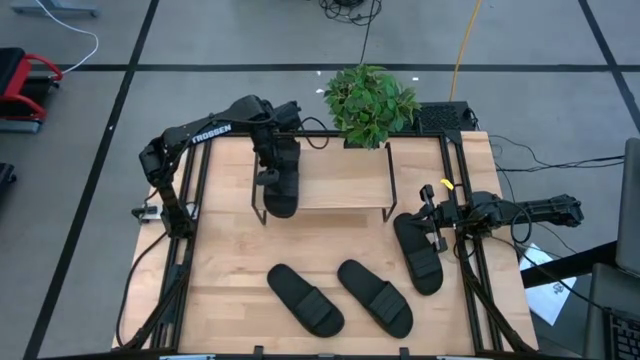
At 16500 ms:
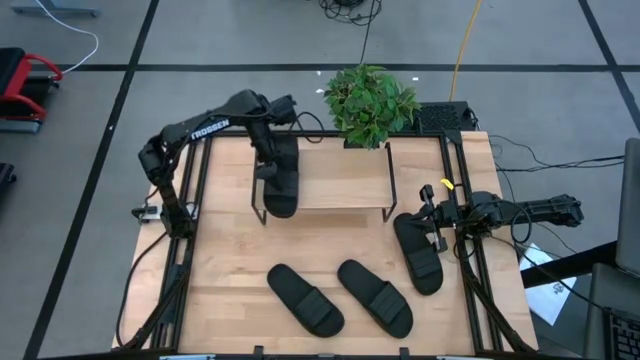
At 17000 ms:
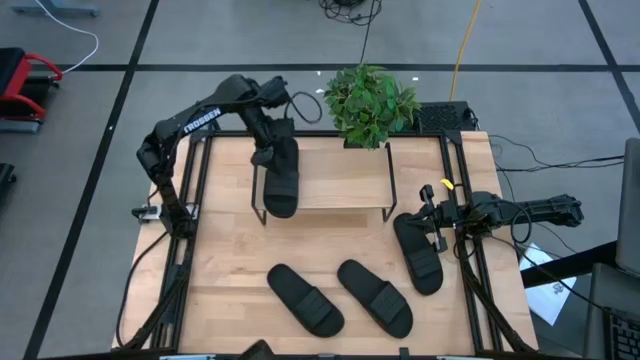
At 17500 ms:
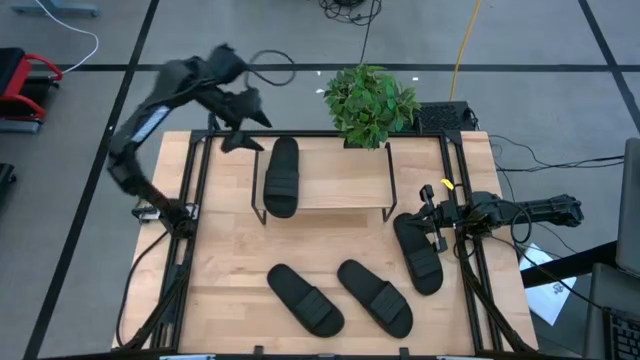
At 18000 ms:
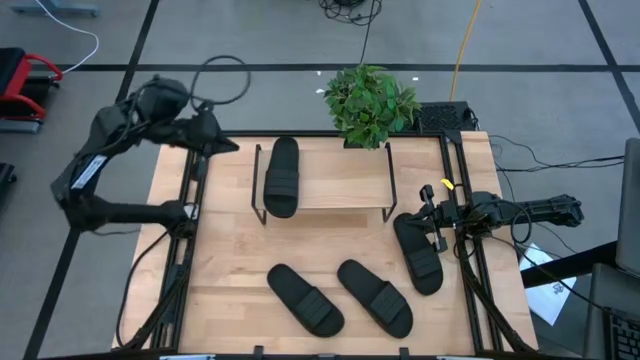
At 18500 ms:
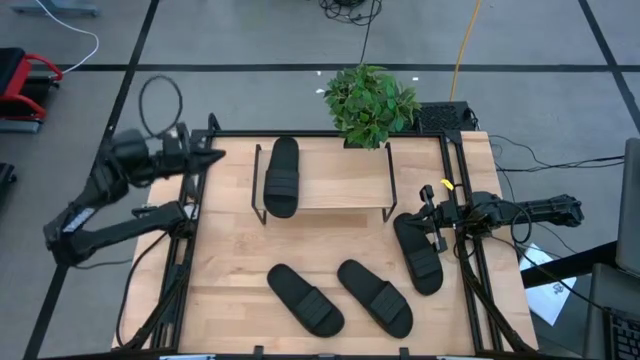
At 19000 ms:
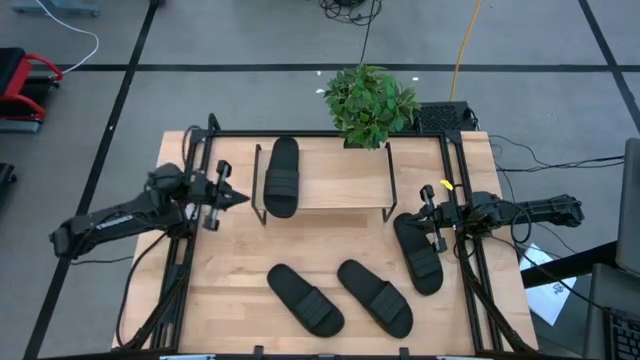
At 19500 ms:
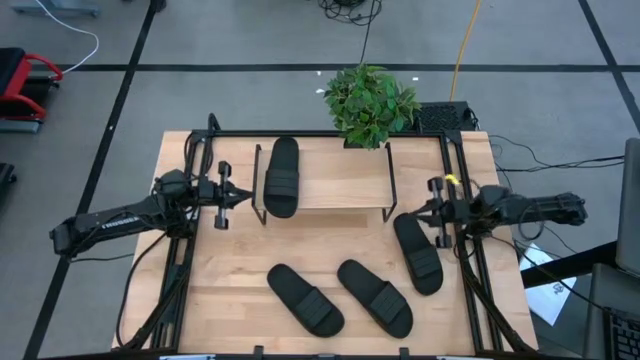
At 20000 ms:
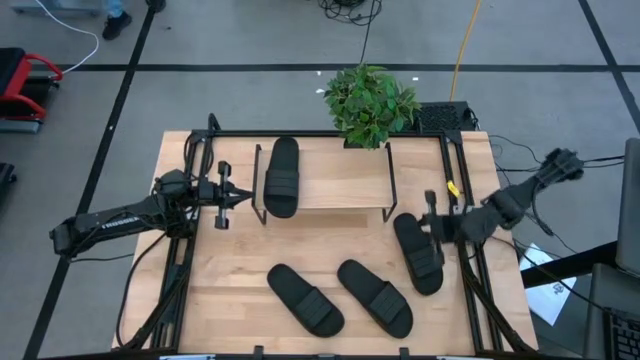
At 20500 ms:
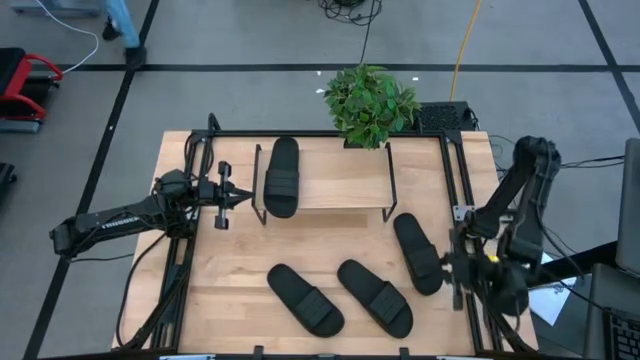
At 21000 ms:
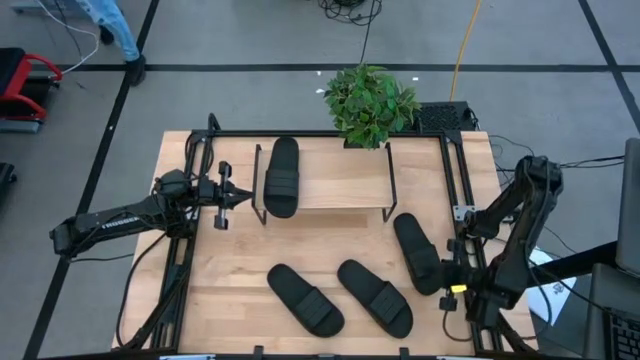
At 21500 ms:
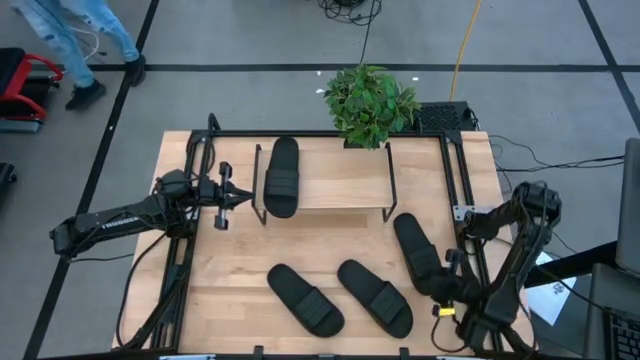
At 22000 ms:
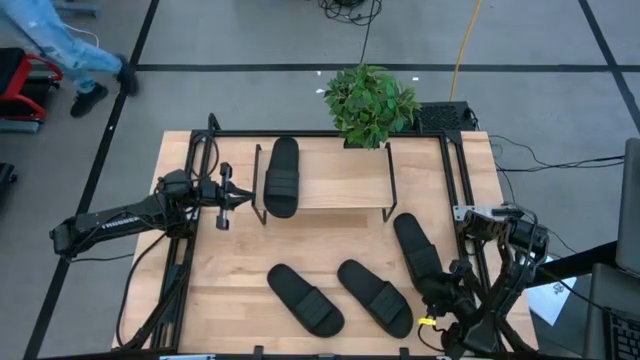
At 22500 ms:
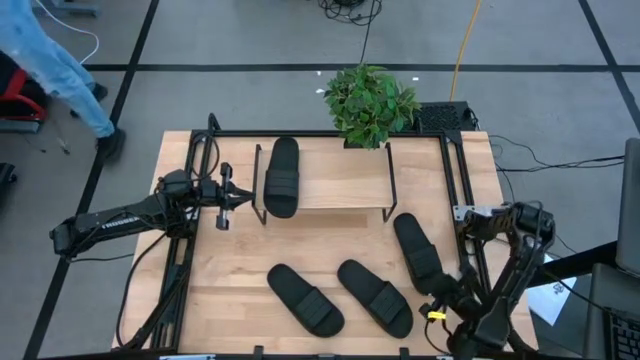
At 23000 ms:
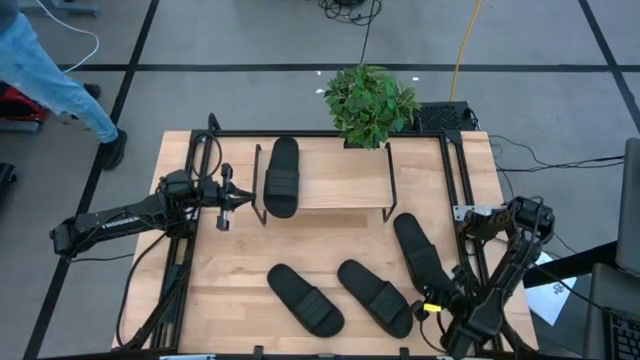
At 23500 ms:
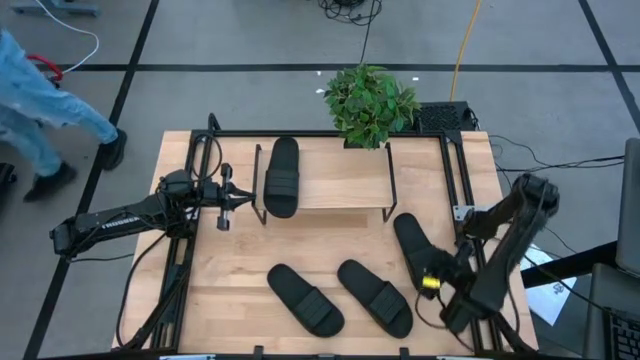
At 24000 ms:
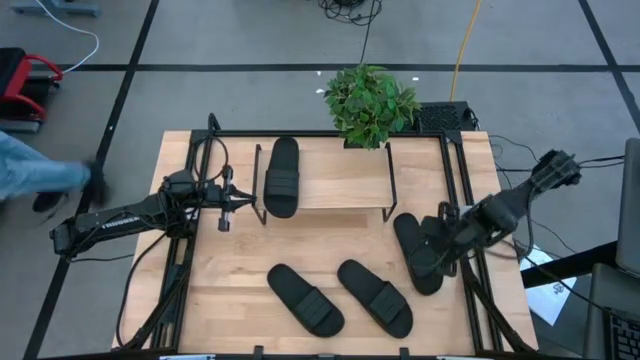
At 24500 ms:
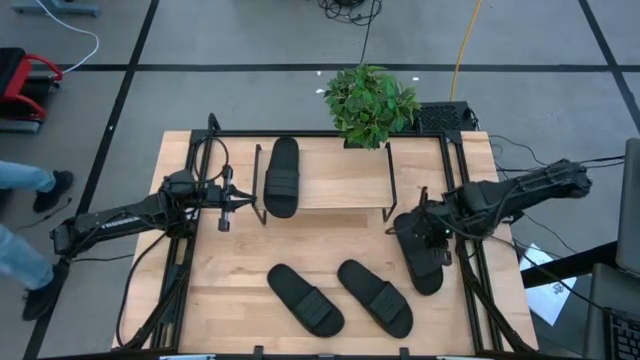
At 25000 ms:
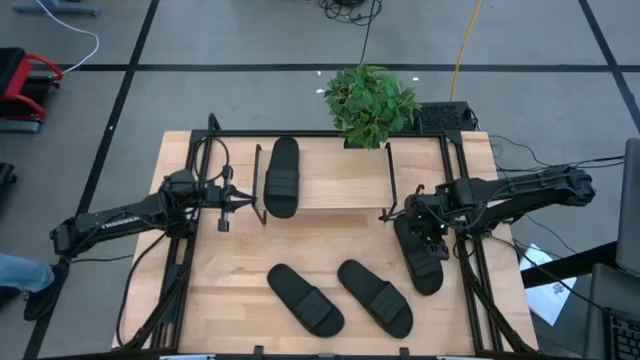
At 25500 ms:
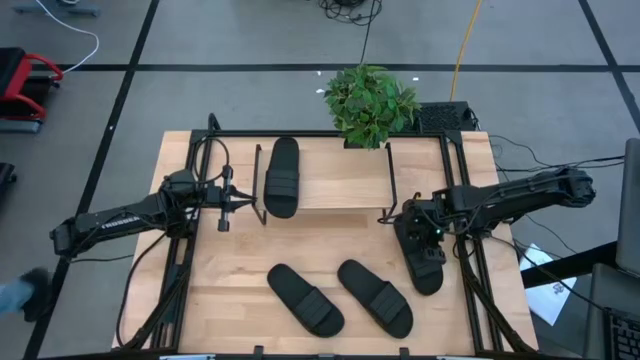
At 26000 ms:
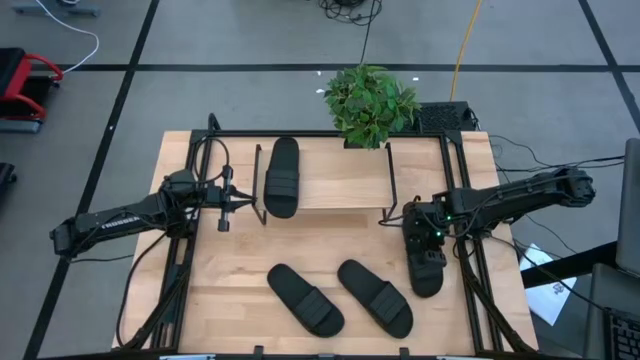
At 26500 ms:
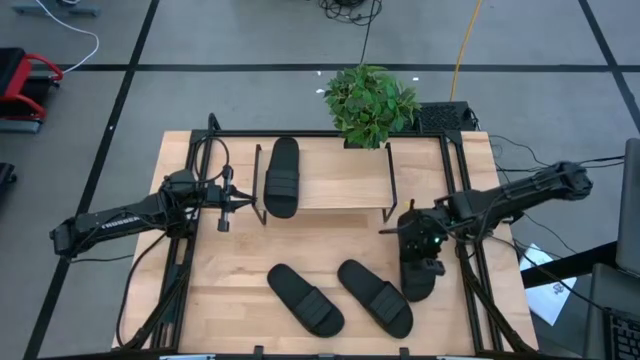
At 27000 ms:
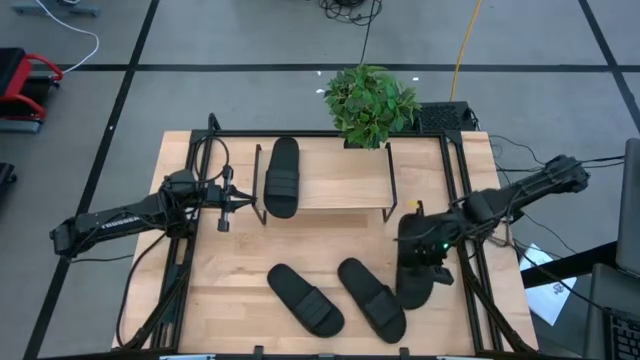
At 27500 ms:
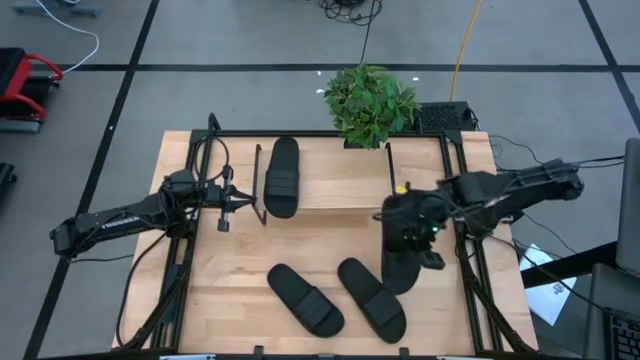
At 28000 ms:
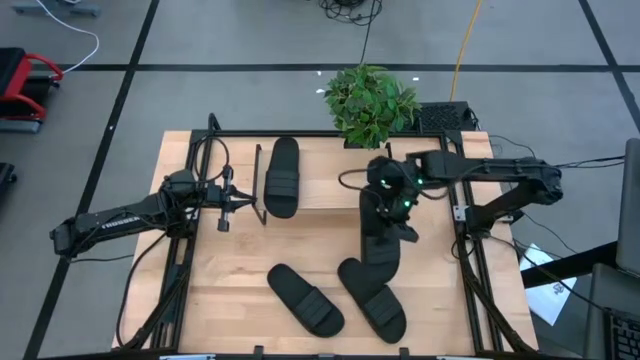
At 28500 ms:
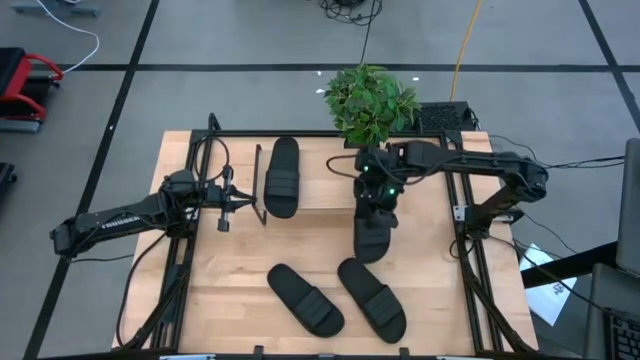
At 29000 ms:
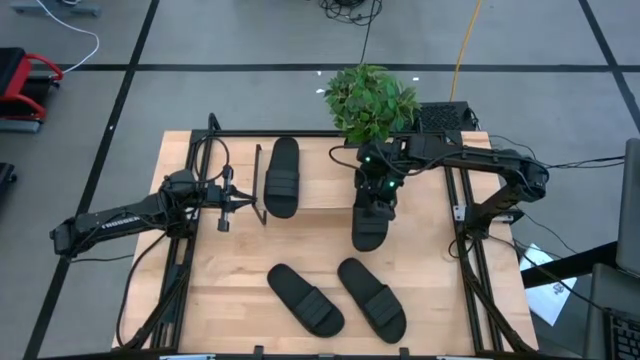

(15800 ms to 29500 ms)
Task: Pick and place slides into the shelf
Put the black slide on the shelf

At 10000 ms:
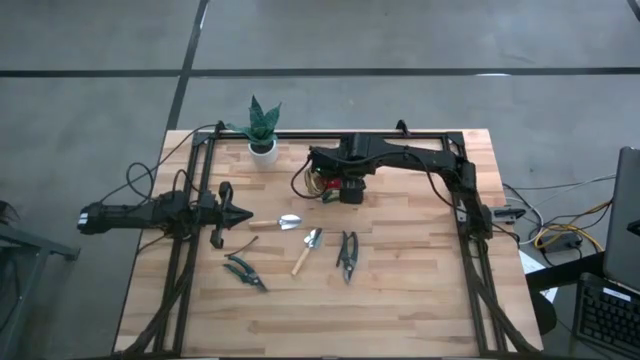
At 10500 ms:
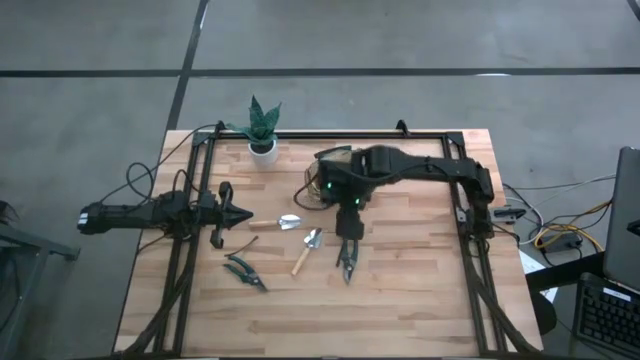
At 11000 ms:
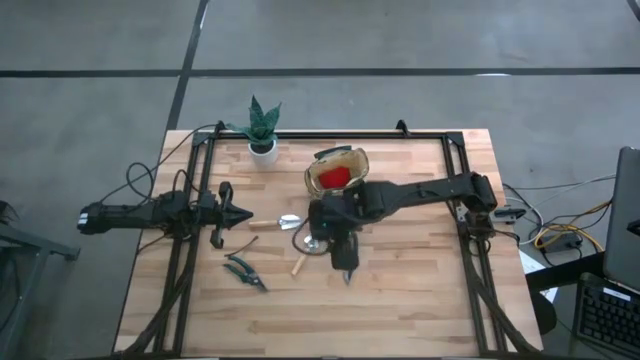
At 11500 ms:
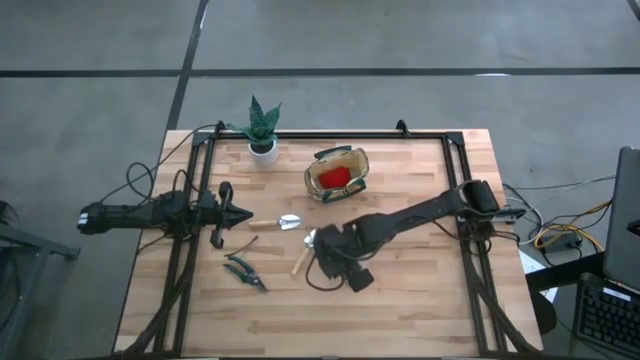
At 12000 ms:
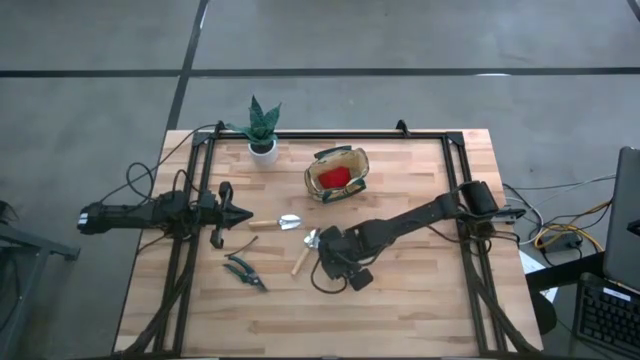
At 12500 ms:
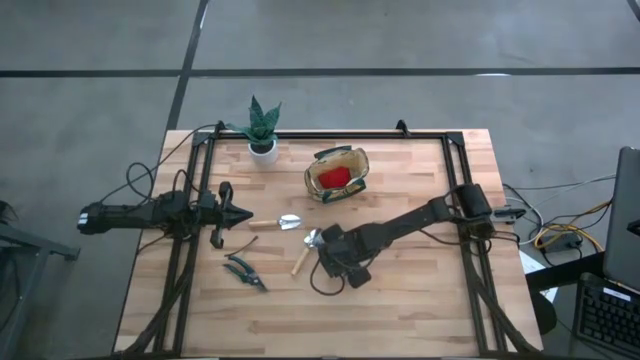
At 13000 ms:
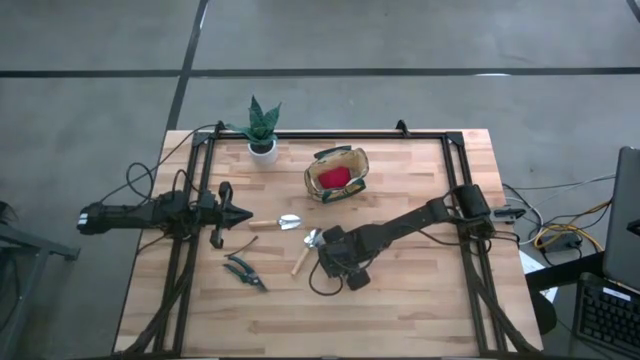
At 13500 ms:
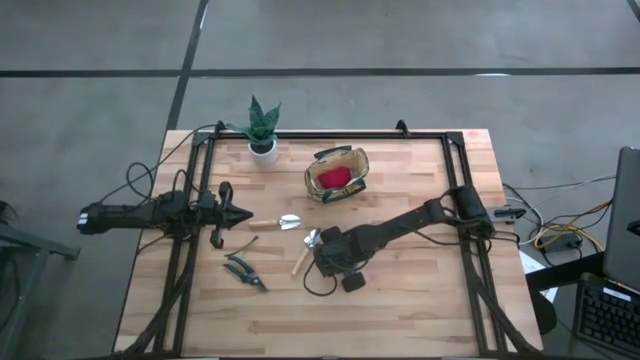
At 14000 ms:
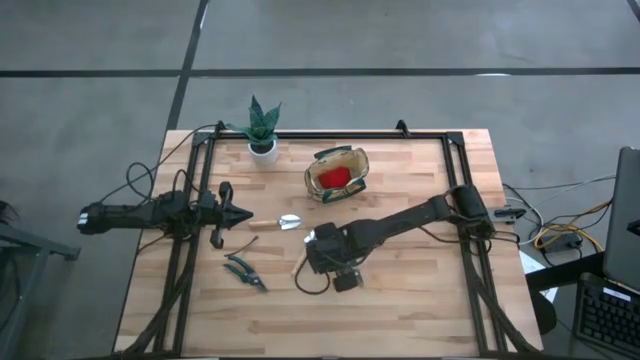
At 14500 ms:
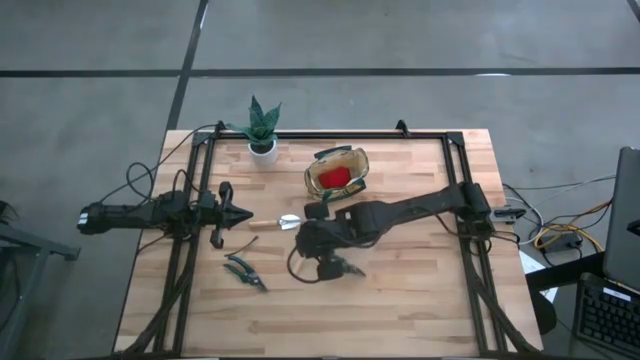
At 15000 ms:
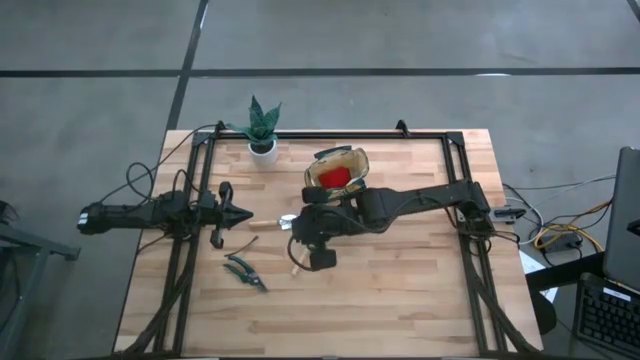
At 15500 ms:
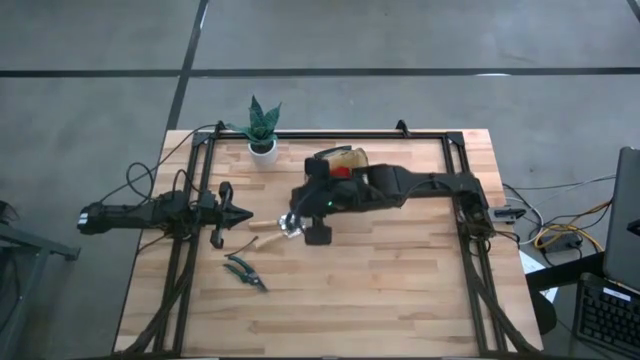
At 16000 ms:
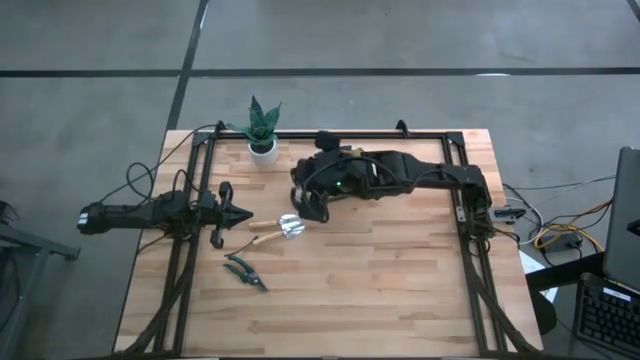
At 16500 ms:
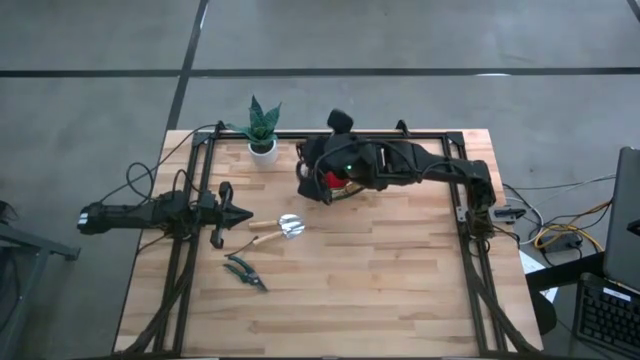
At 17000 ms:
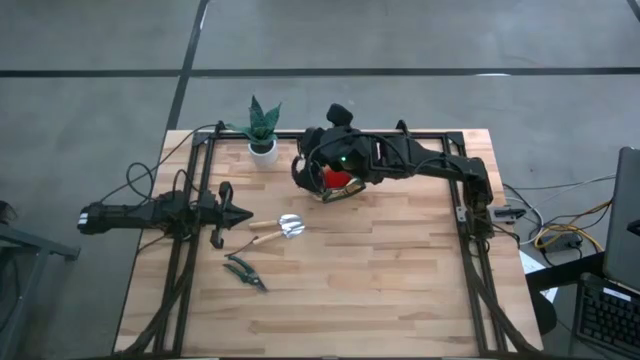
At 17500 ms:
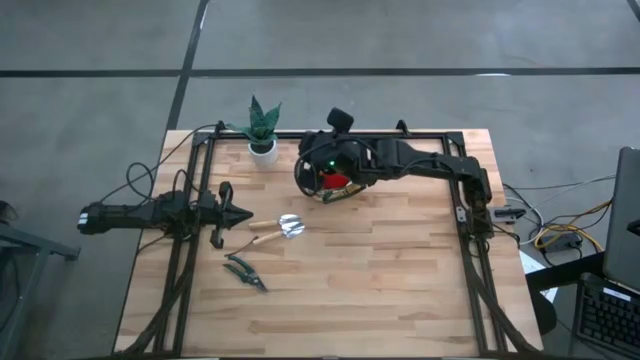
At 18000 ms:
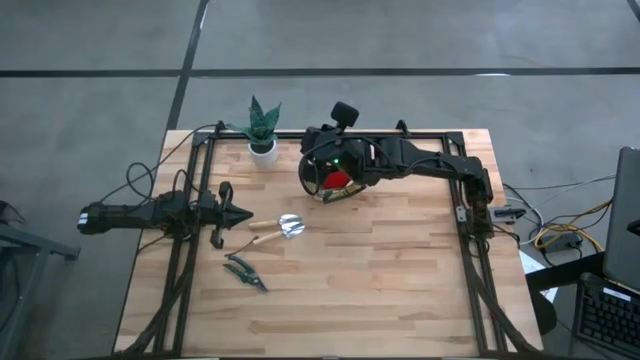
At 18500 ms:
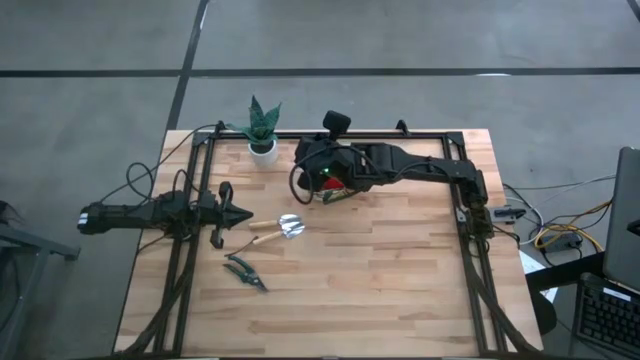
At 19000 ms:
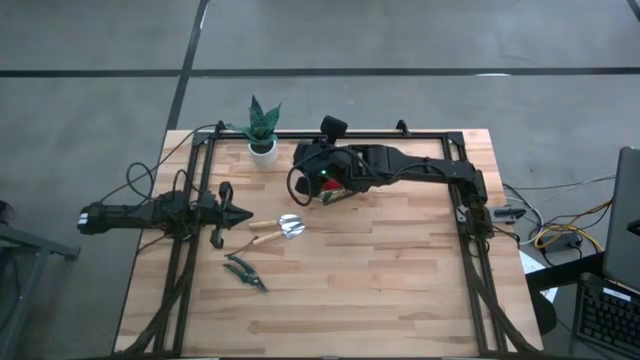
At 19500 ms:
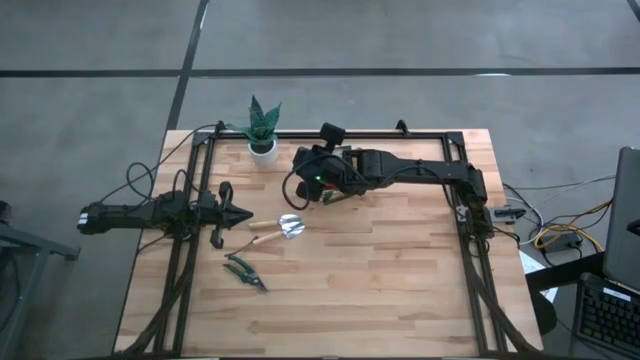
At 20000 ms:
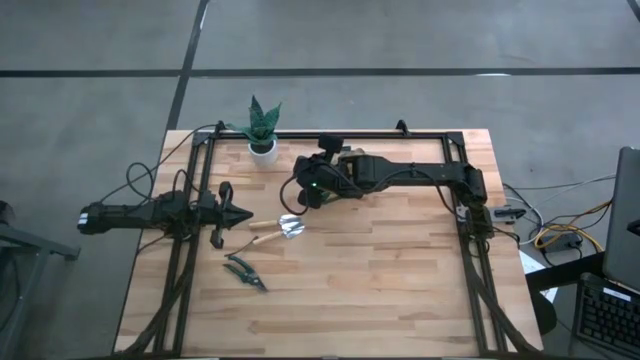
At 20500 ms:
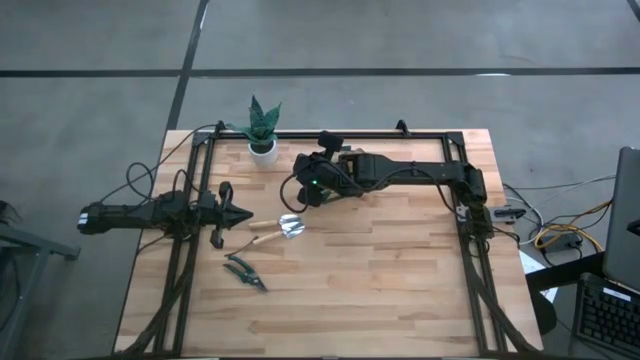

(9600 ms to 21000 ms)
Task: Pick & Place Garden tools in Gardening bag
Put the green shear scissors into the white bag
